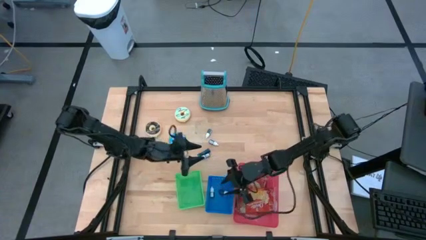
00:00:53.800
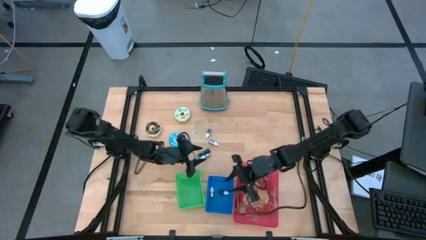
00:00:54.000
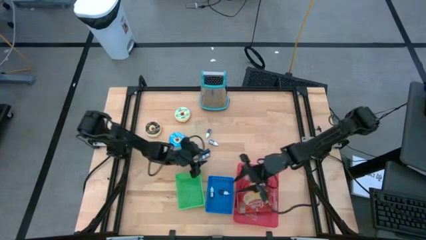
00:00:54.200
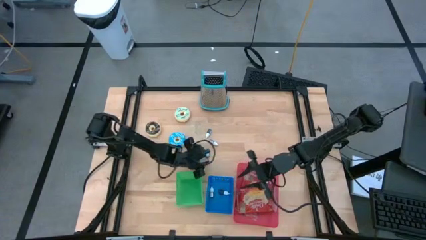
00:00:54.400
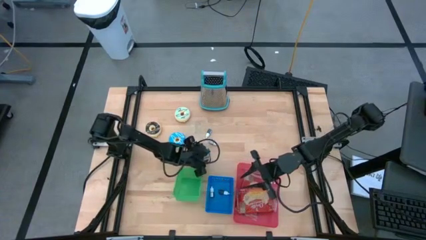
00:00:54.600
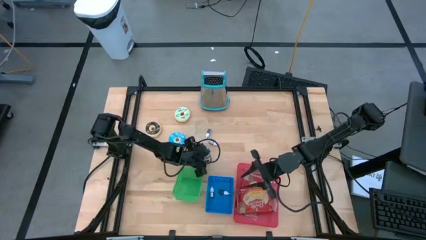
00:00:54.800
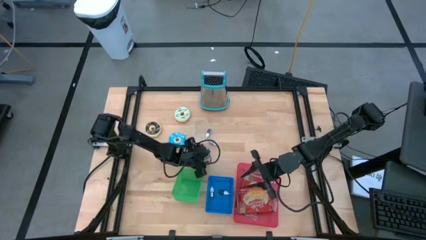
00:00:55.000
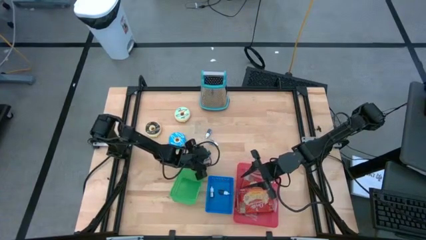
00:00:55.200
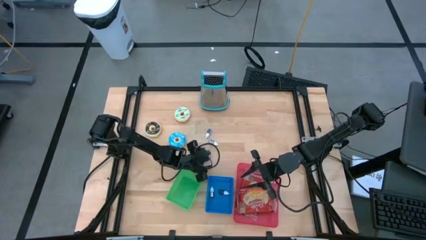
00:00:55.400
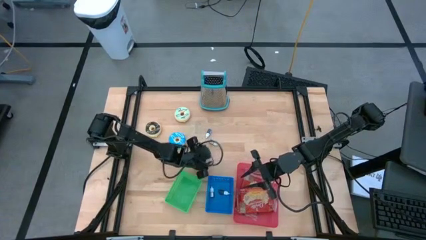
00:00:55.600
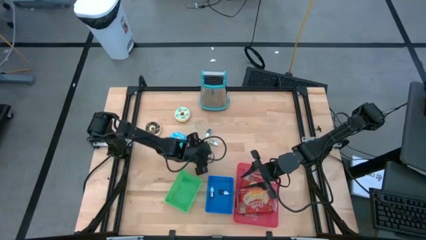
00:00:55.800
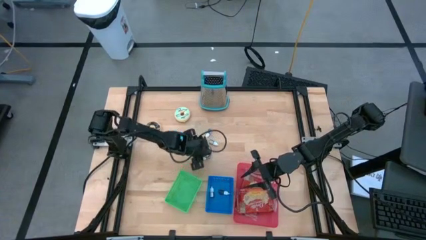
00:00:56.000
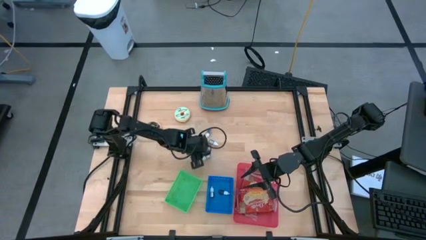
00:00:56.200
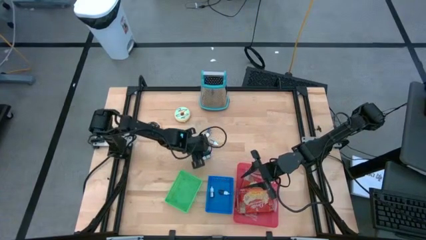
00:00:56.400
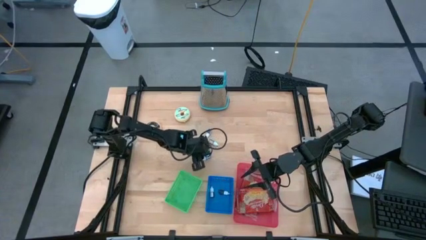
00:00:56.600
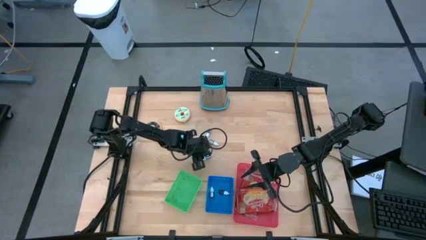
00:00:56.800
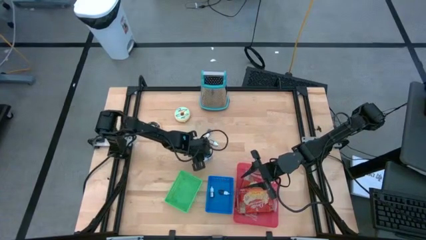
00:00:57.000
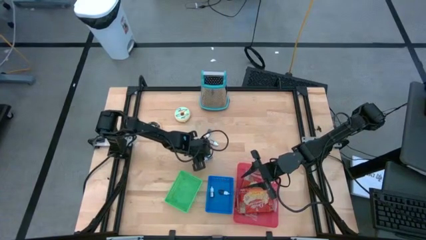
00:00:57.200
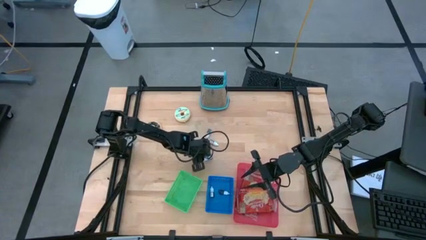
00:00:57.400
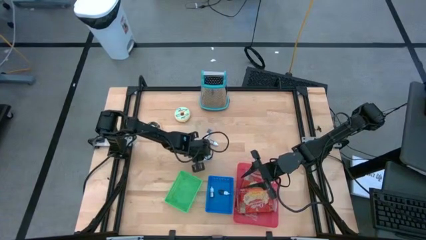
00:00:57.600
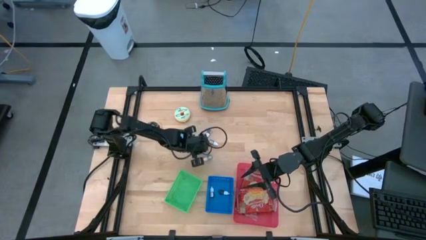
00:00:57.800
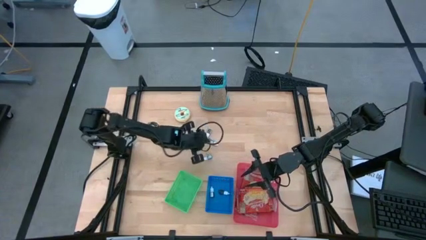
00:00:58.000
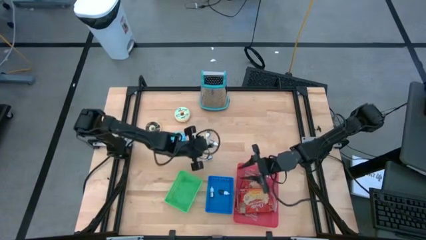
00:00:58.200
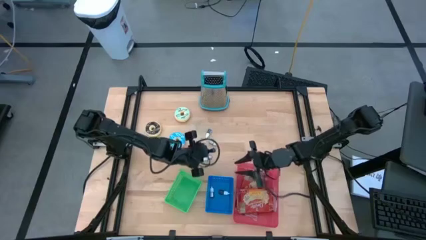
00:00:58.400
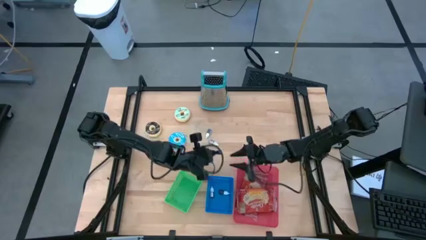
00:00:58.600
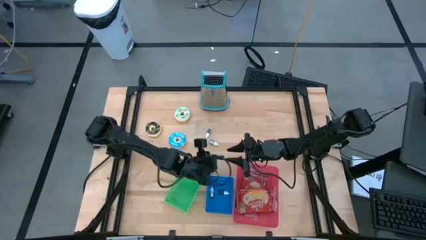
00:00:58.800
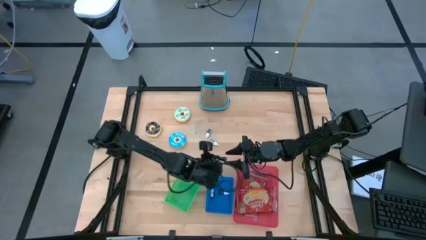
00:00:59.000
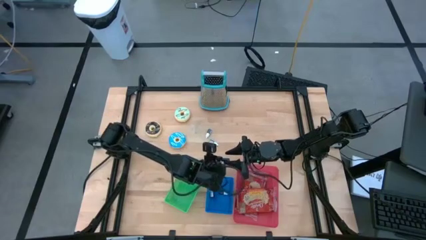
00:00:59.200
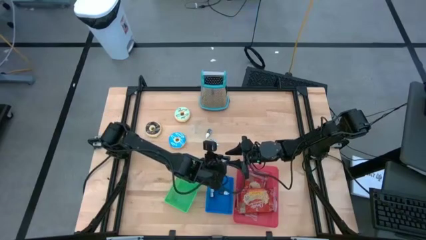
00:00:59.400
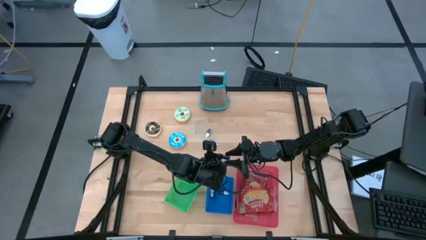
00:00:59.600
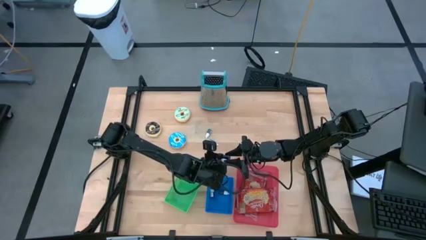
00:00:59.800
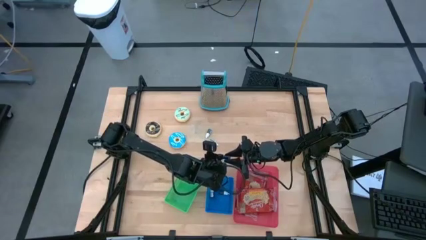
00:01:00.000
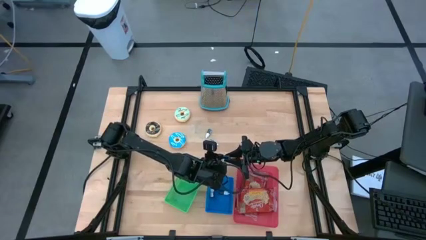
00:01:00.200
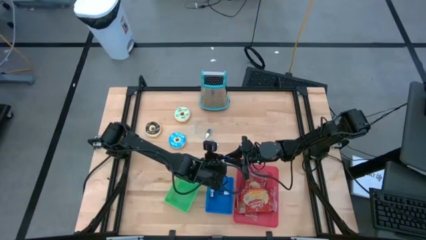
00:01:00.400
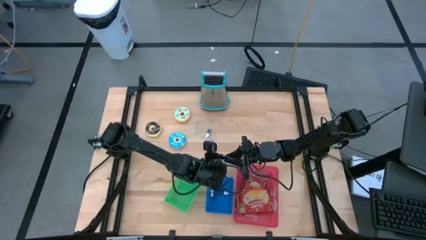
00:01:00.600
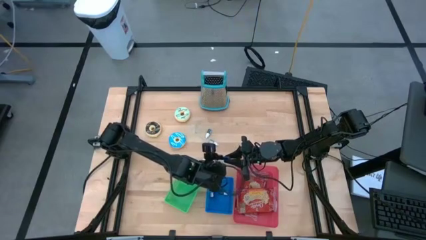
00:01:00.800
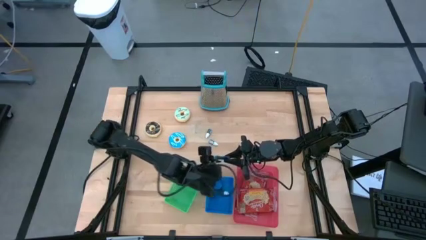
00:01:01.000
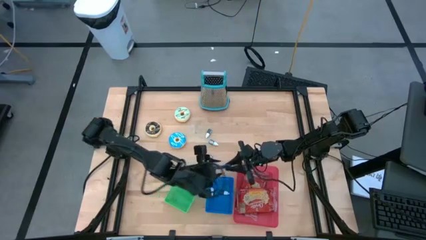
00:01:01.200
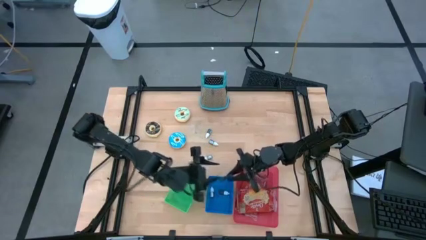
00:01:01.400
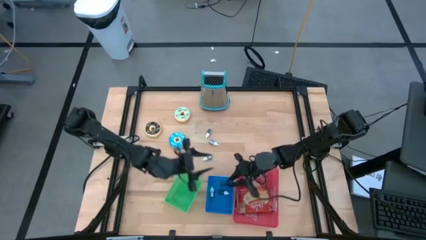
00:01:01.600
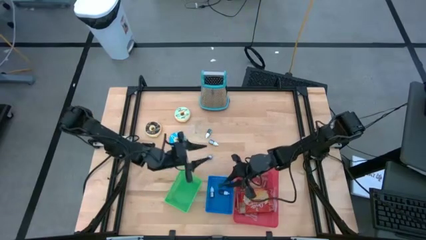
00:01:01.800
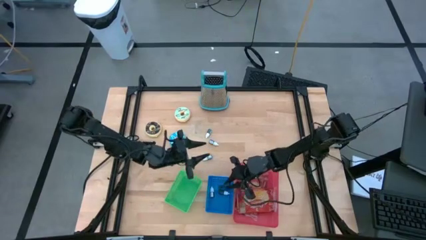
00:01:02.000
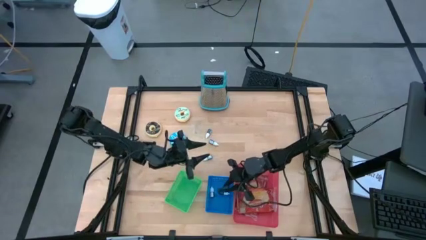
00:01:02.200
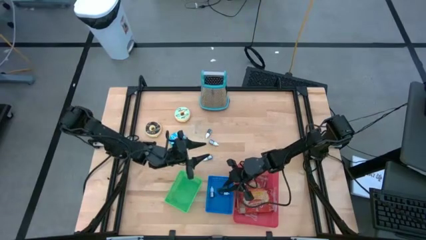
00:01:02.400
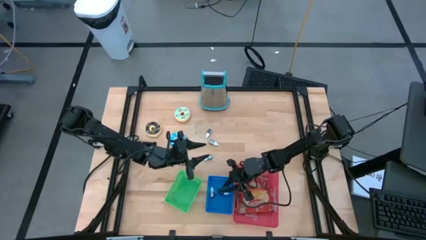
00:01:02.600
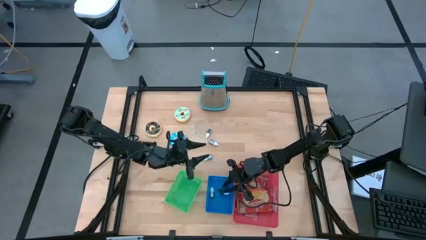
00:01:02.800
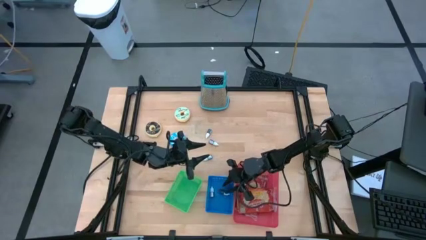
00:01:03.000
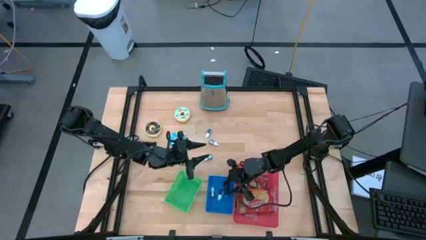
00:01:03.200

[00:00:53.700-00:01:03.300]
Put the blue food coloring bottle into the blue bin

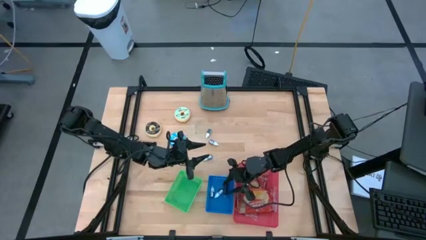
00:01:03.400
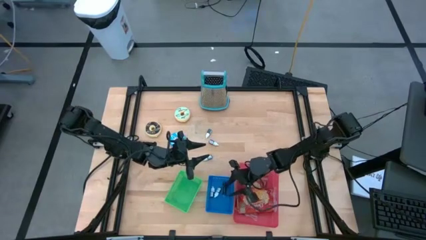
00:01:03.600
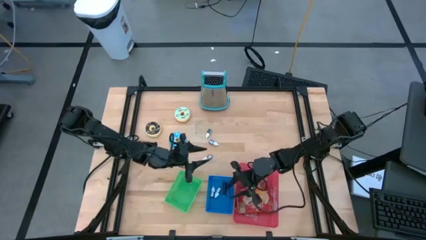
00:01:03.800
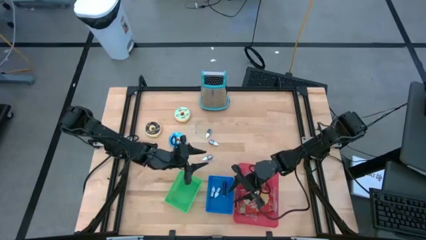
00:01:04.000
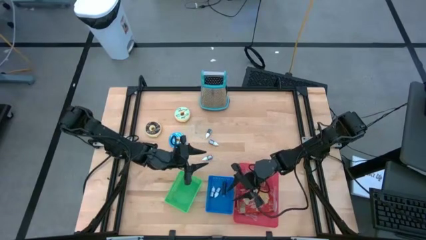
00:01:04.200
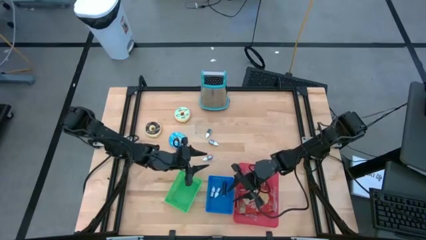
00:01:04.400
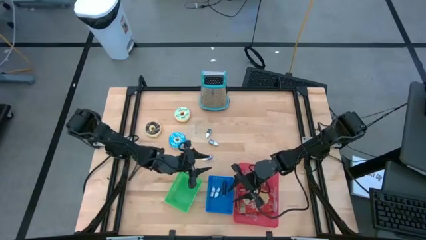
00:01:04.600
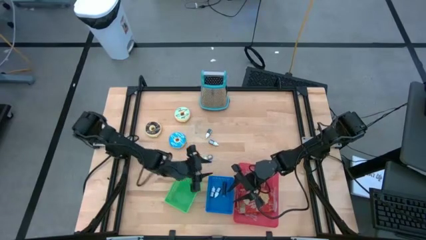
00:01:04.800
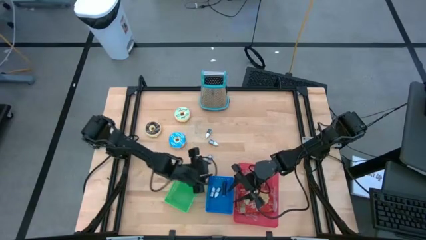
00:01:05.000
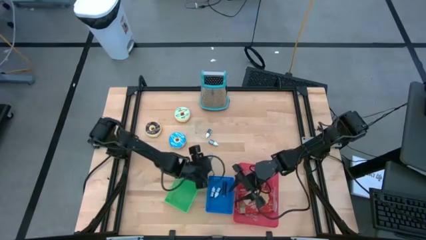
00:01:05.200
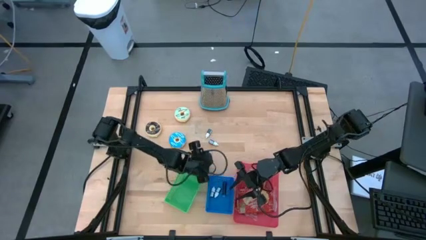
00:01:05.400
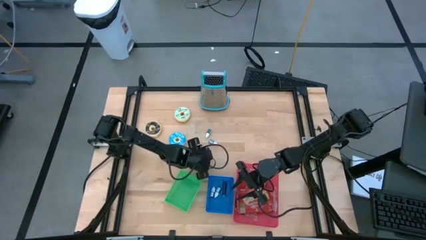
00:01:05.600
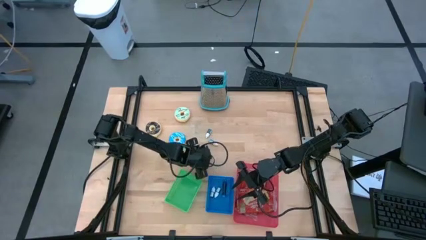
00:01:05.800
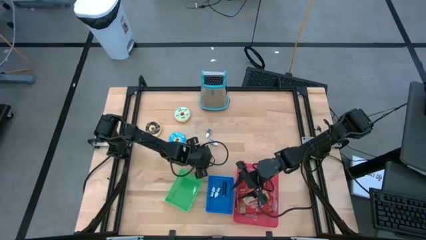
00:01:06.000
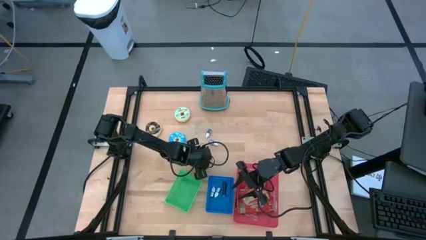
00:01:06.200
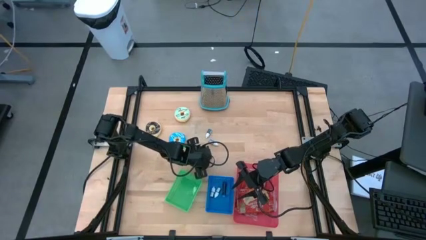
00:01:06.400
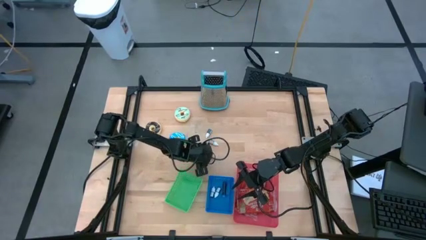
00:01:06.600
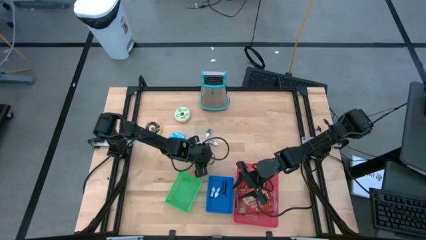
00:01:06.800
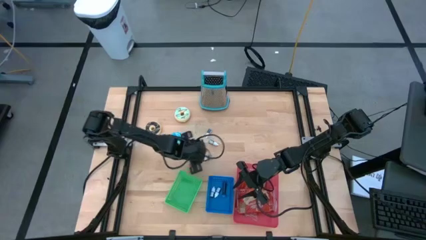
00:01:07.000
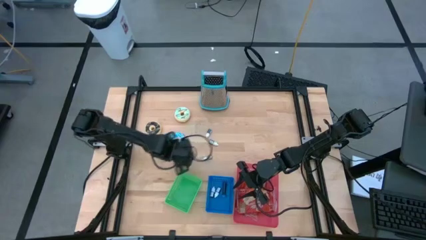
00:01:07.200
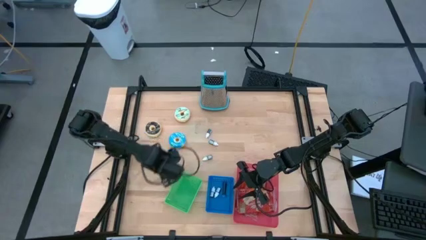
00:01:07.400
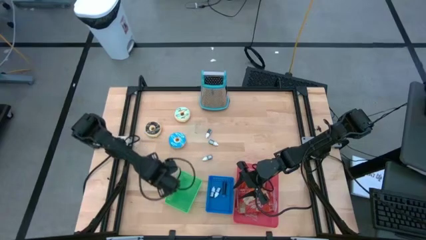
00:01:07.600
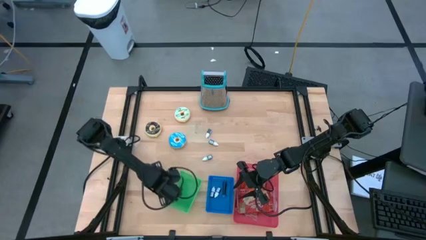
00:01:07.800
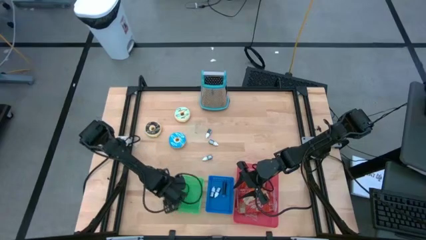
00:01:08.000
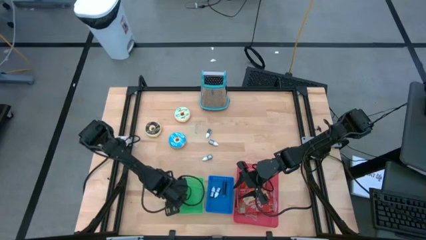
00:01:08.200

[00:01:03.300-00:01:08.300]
Adjust the green bin on the table
